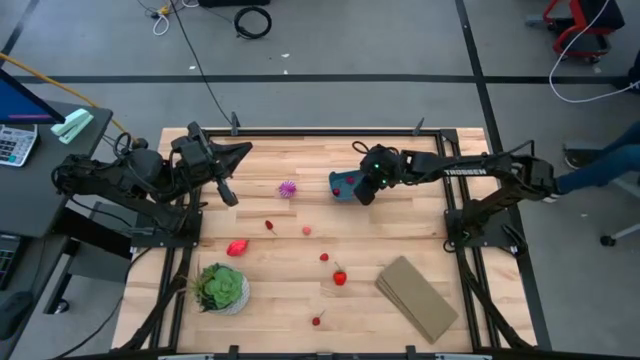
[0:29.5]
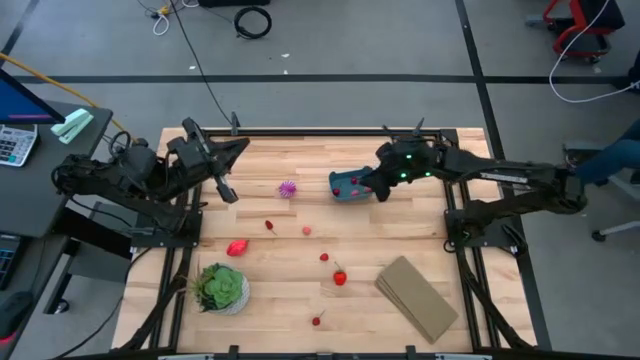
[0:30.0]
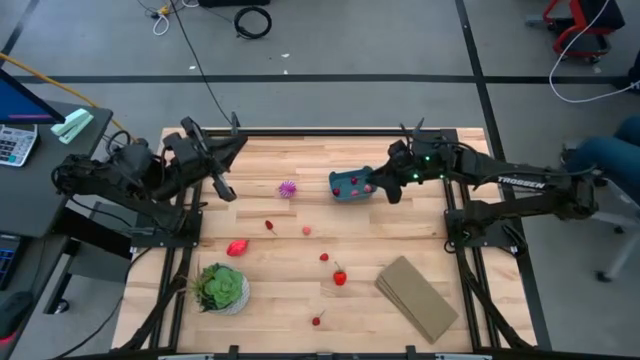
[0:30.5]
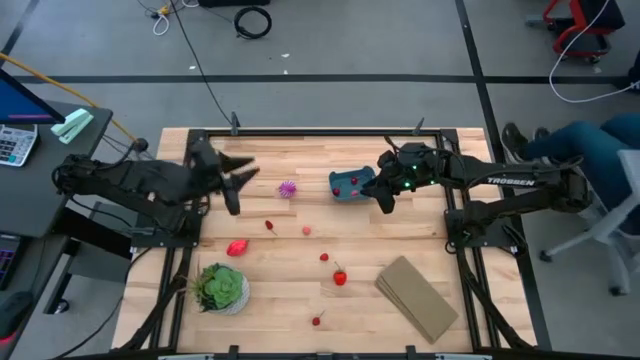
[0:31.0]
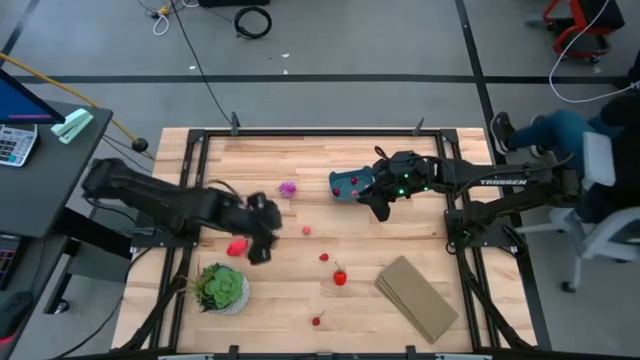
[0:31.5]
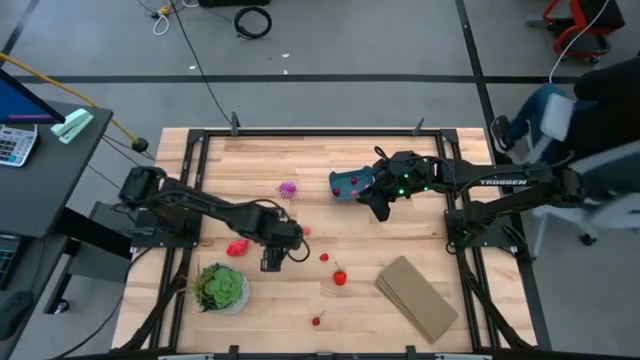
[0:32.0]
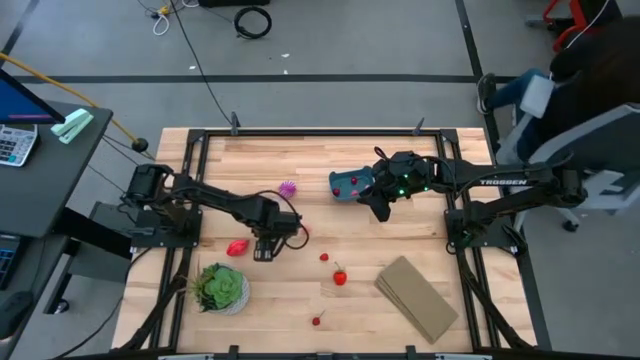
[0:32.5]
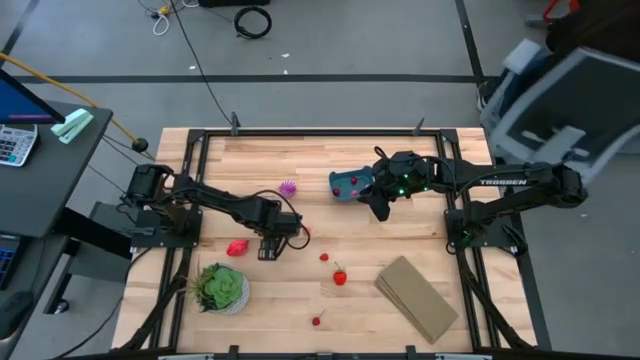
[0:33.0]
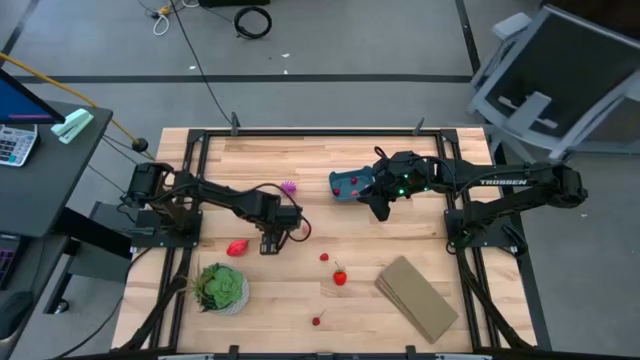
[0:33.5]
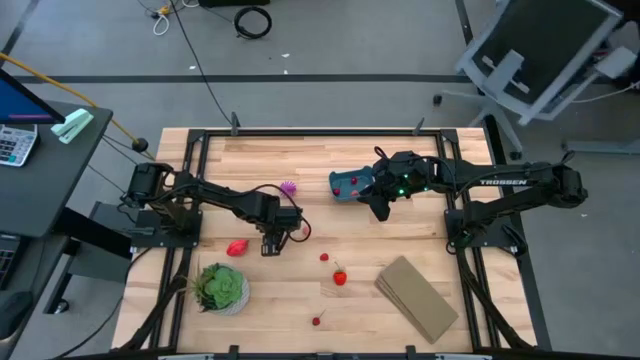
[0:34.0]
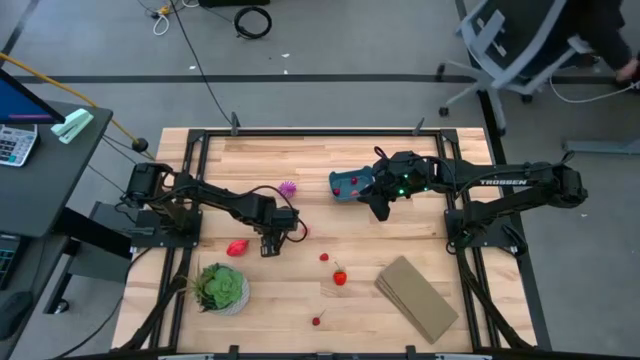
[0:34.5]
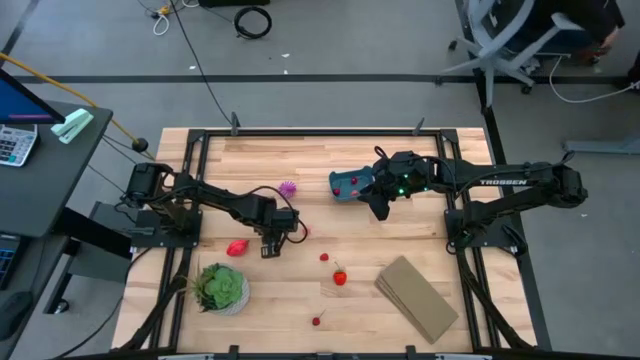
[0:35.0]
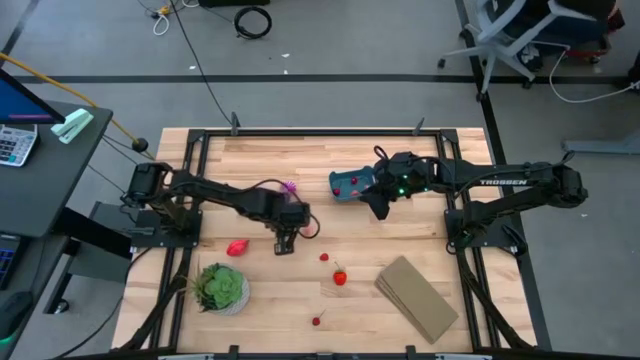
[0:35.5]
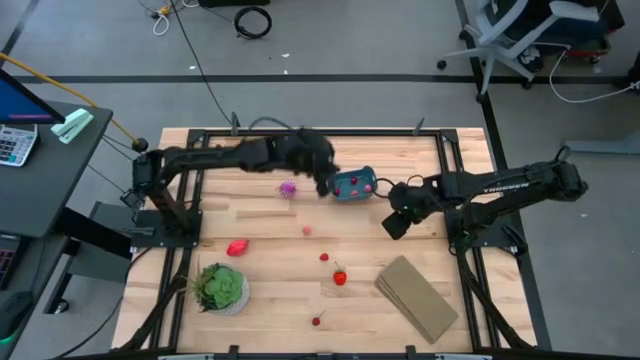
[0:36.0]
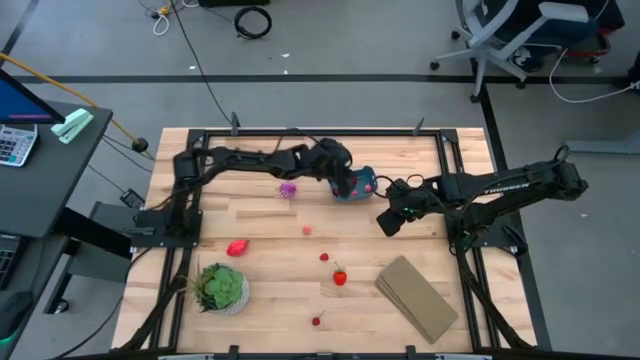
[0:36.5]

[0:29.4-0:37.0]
Task: Pick and placing Produce into tupperware
Put the top cherry in the bin

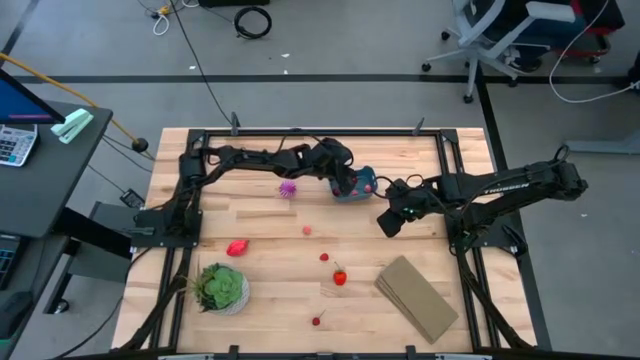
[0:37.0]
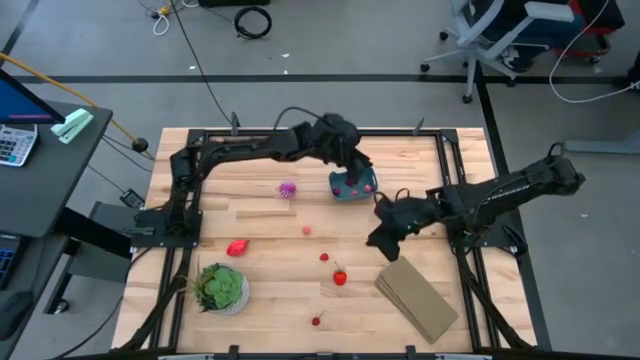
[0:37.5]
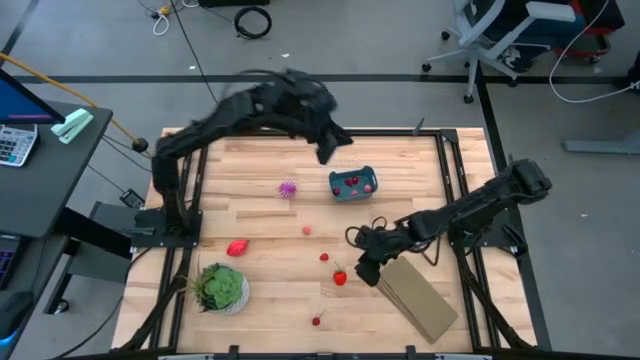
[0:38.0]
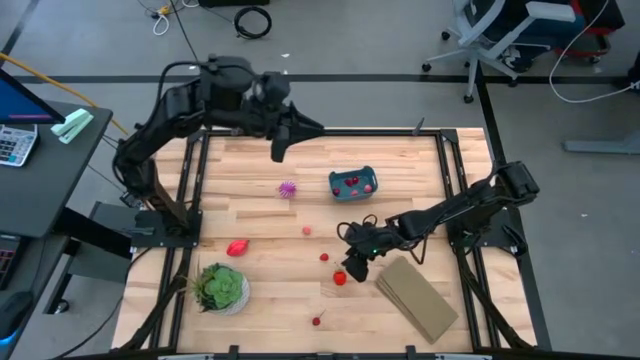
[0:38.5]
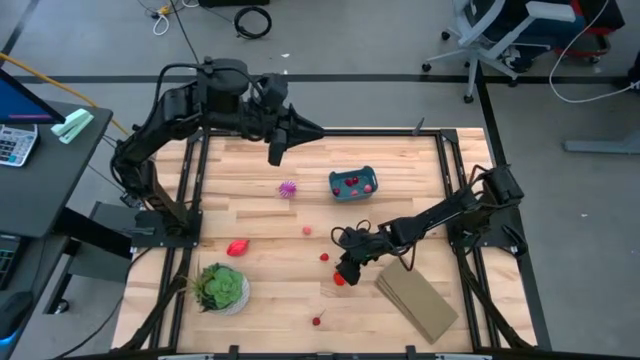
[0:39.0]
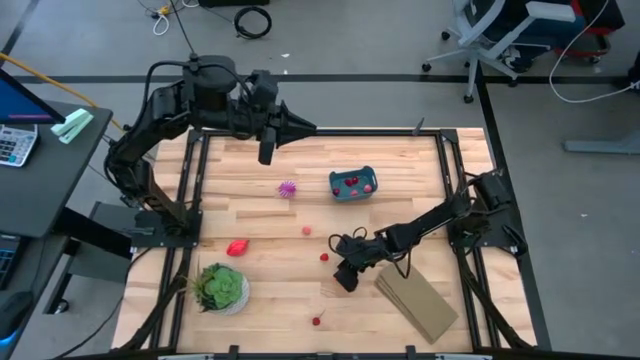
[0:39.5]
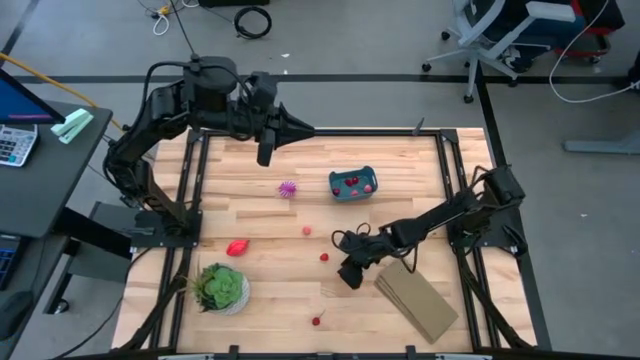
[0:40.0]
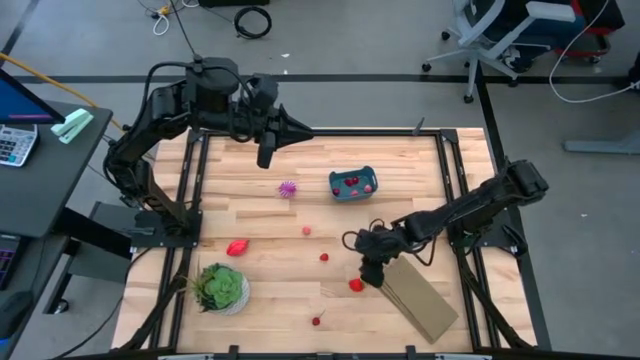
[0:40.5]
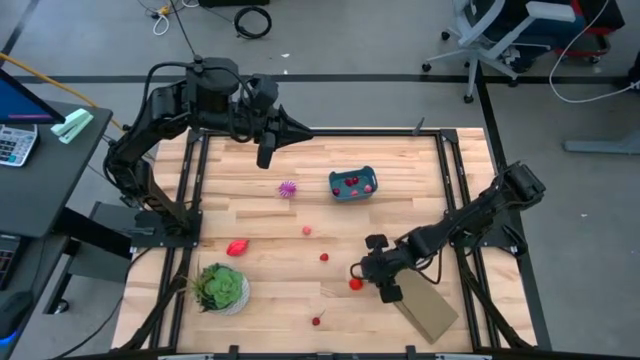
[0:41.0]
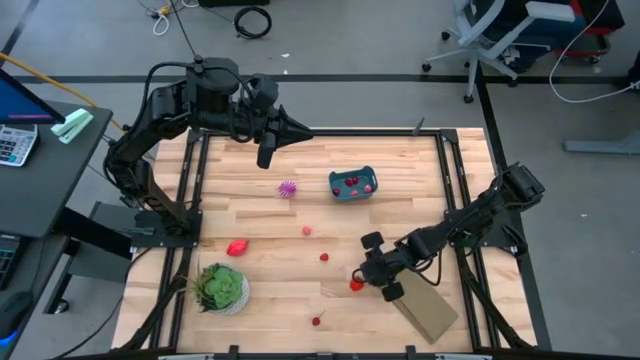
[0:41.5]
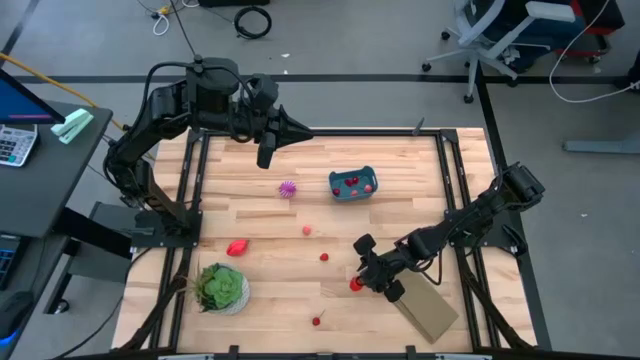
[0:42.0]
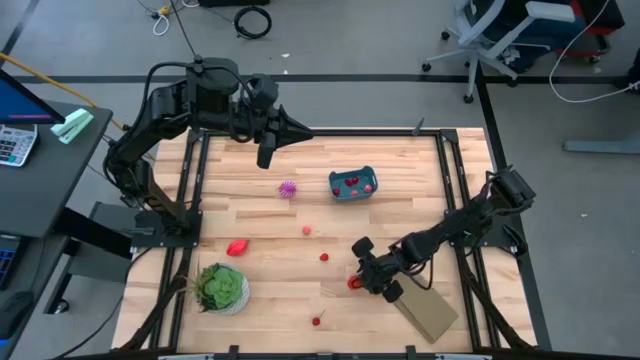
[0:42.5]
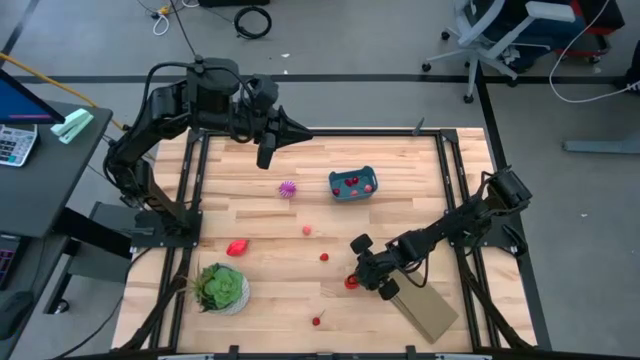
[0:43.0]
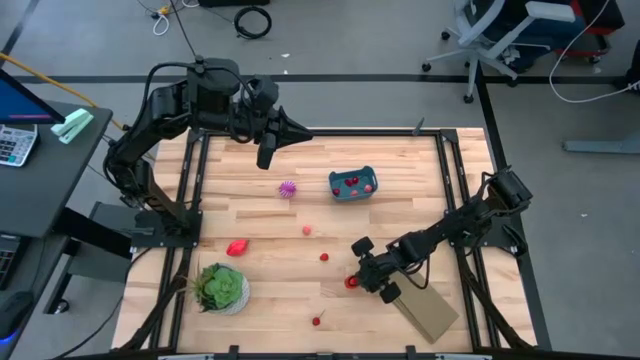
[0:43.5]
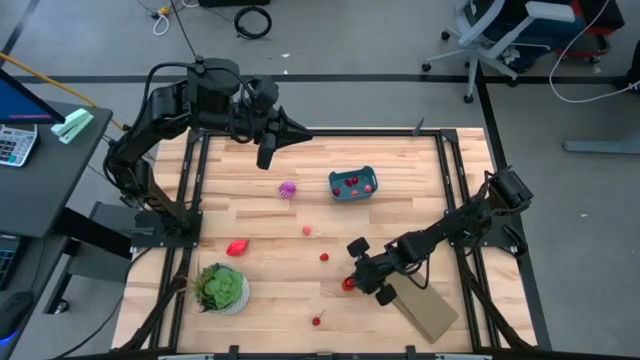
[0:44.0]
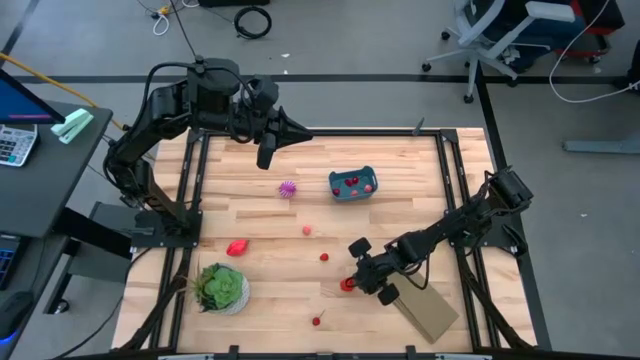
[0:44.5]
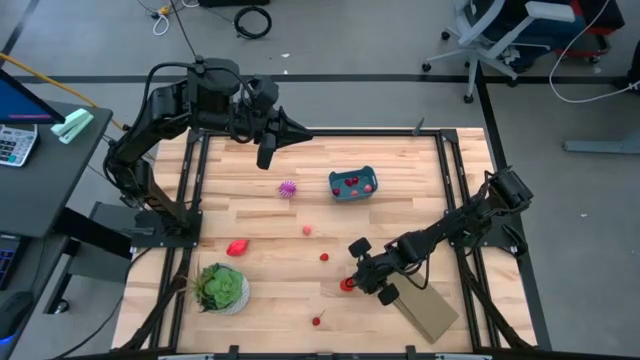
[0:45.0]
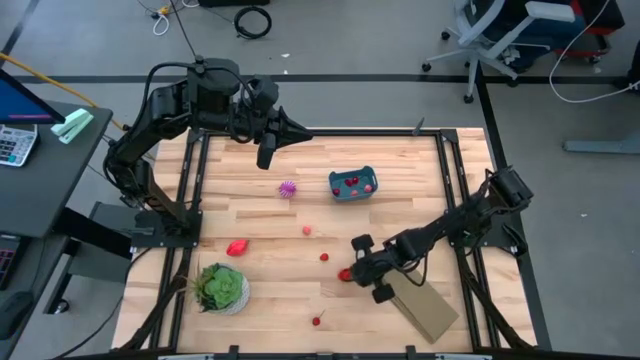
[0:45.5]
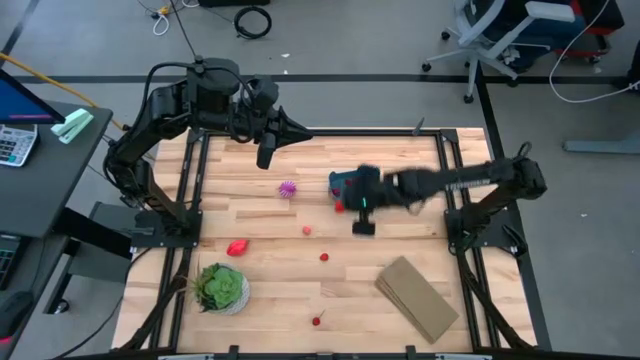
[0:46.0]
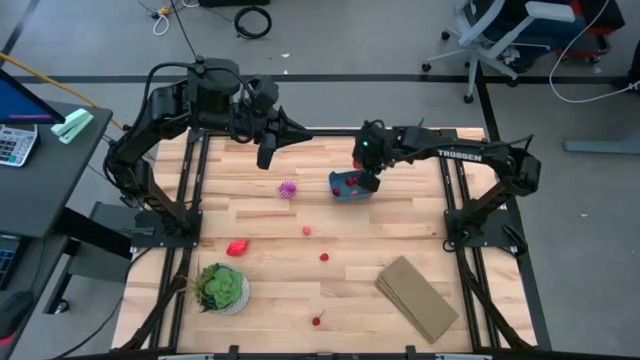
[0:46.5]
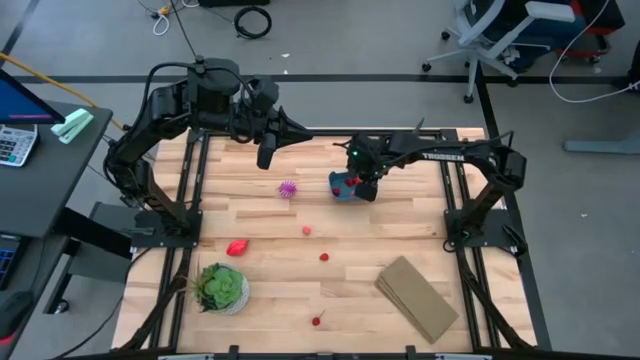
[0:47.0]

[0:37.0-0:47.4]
Put the strawberry into the bin

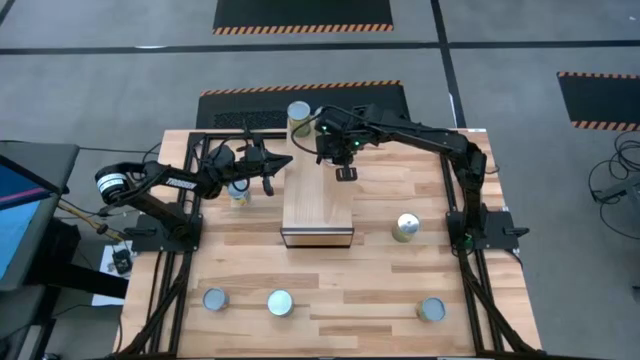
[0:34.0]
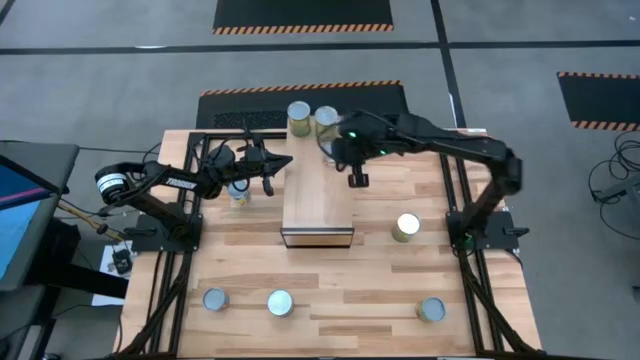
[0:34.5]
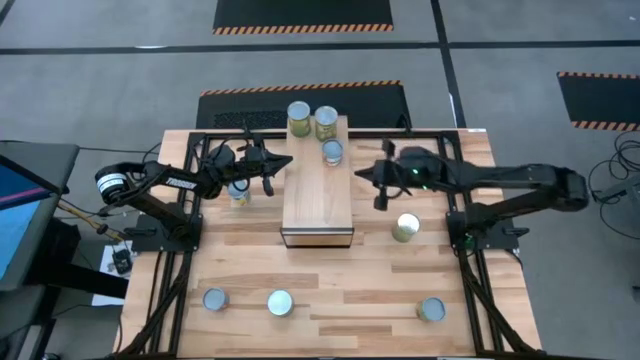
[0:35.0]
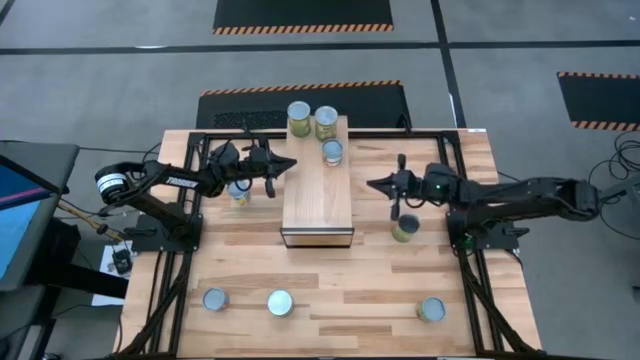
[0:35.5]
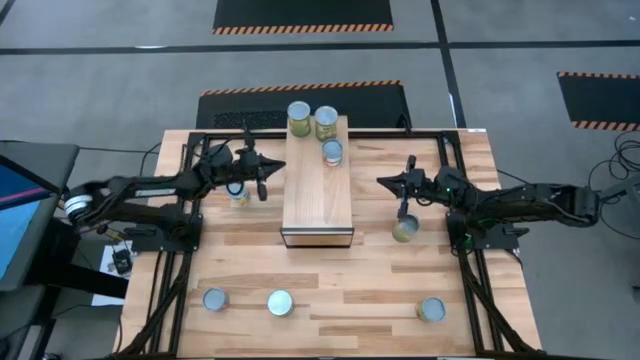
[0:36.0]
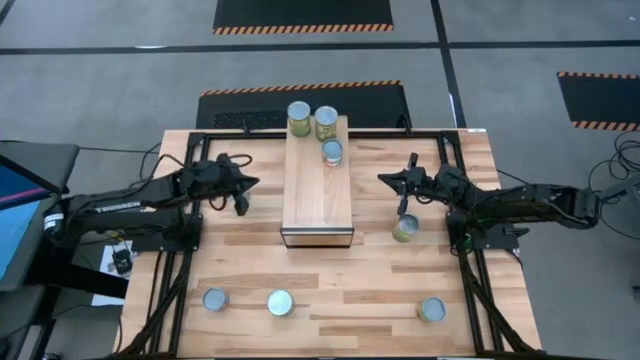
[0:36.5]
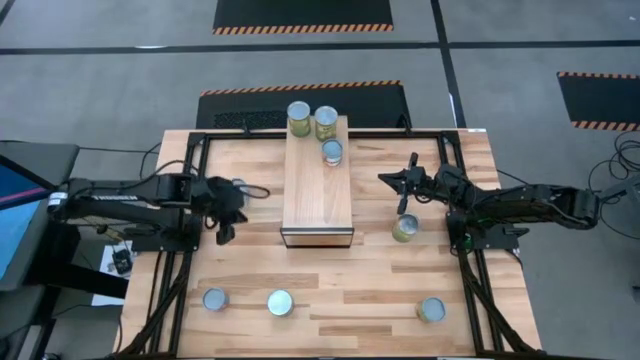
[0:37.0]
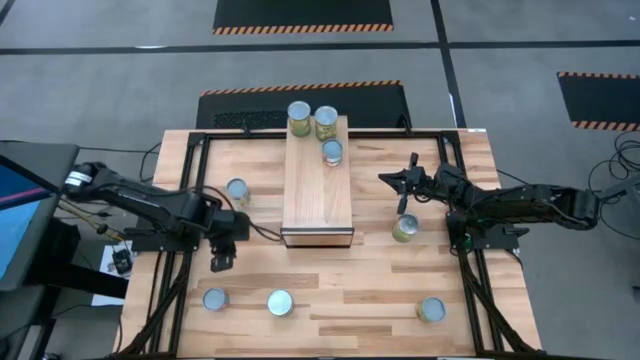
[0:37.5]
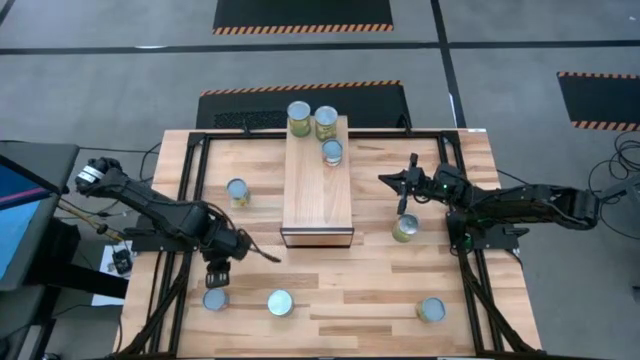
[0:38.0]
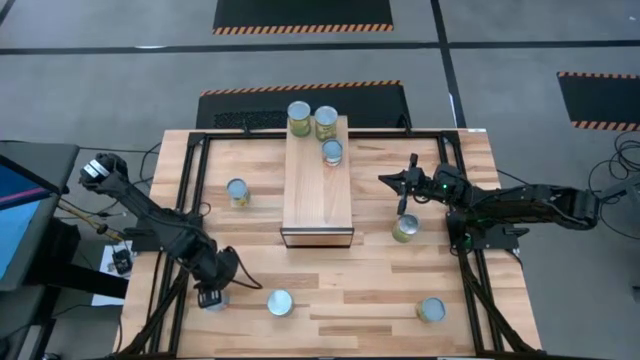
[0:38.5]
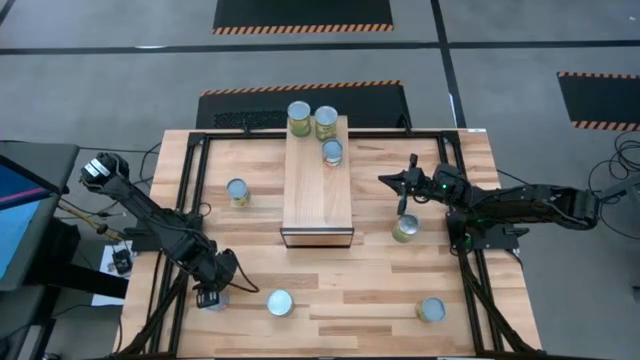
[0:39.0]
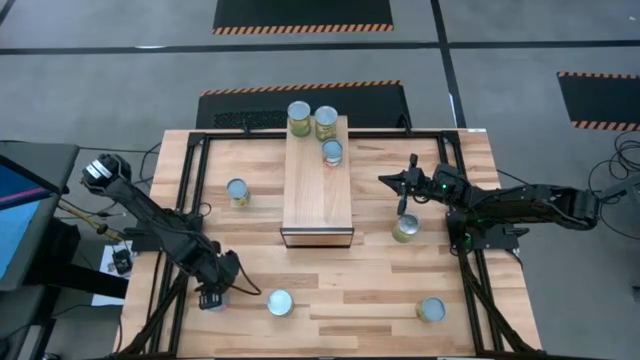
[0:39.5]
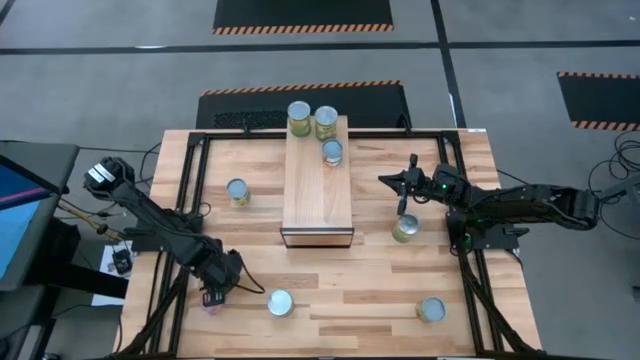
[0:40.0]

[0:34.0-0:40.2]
Task: Pick and place cans onto a shelf
Put the canned corn on the shelf
